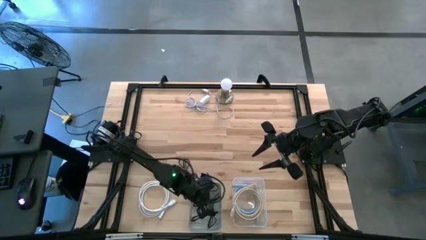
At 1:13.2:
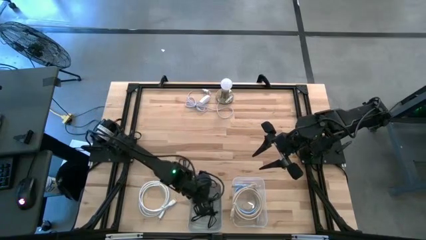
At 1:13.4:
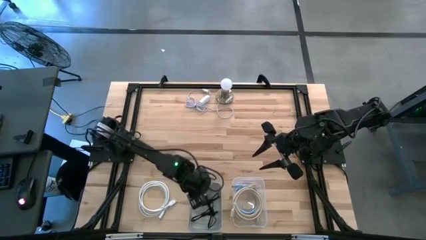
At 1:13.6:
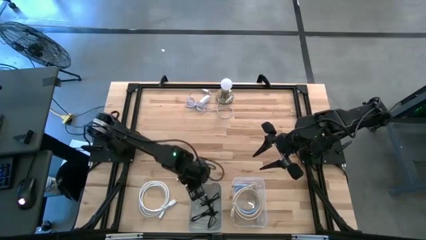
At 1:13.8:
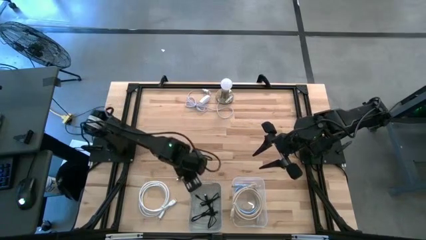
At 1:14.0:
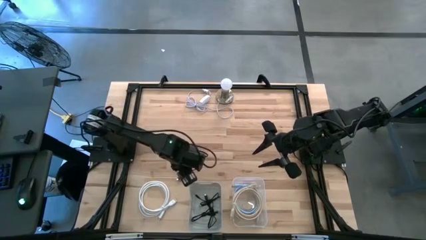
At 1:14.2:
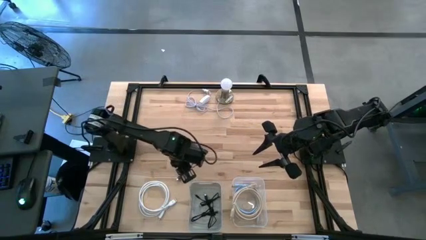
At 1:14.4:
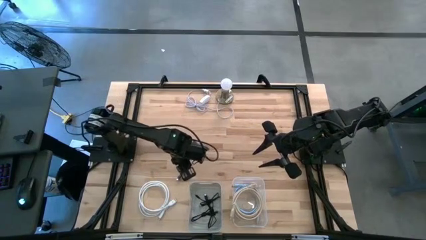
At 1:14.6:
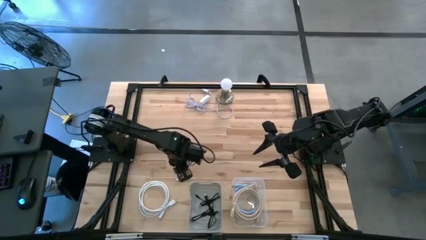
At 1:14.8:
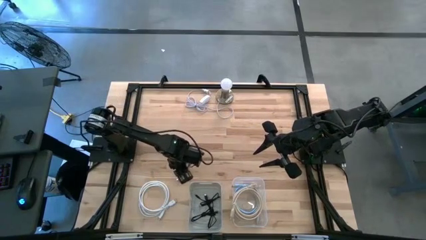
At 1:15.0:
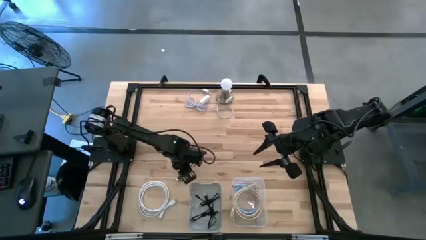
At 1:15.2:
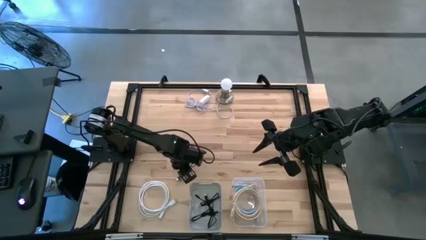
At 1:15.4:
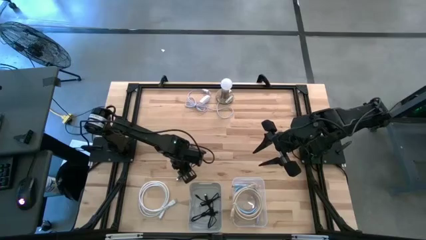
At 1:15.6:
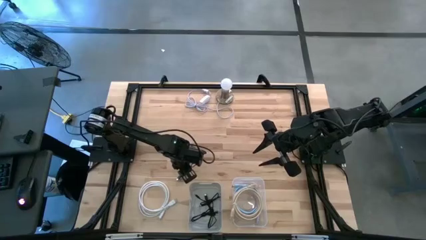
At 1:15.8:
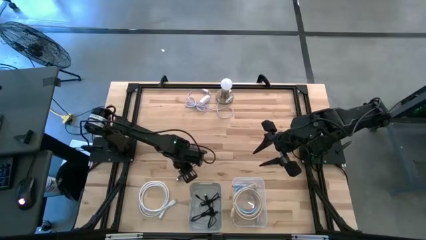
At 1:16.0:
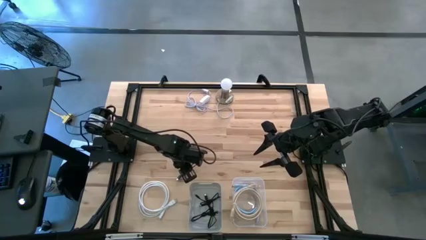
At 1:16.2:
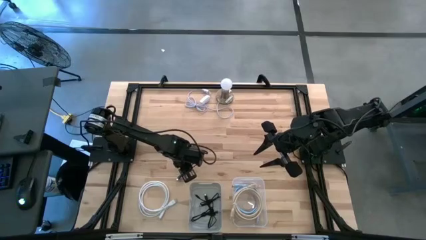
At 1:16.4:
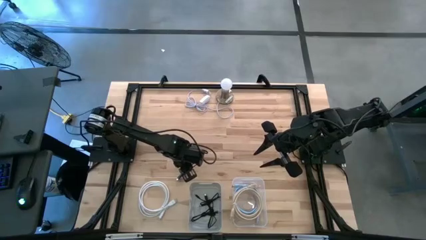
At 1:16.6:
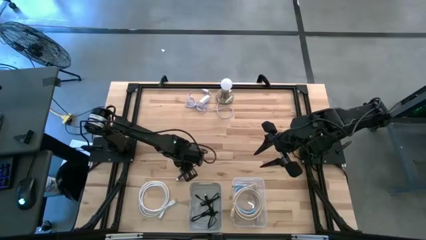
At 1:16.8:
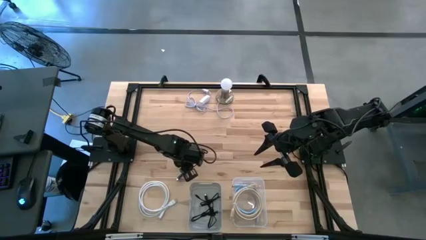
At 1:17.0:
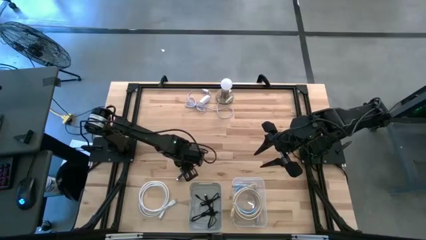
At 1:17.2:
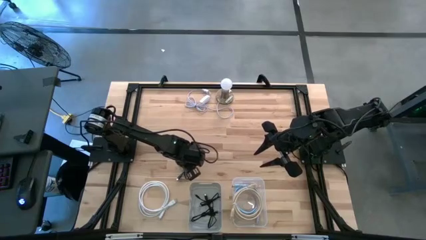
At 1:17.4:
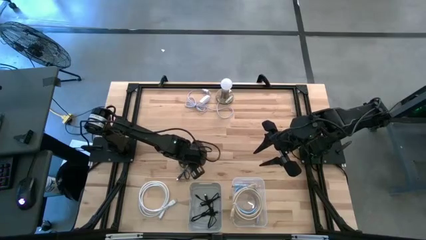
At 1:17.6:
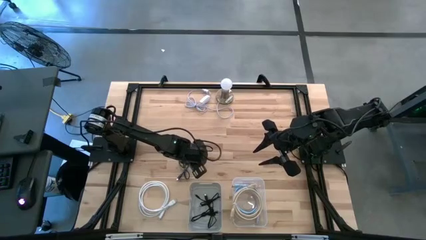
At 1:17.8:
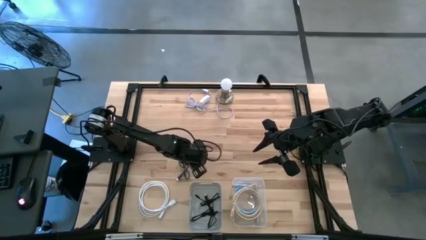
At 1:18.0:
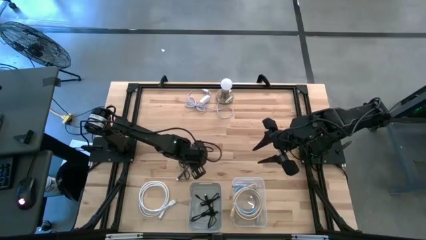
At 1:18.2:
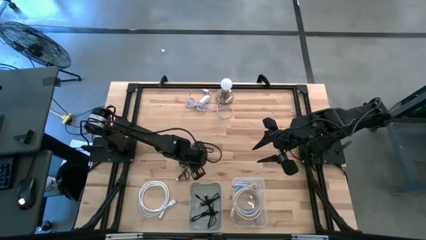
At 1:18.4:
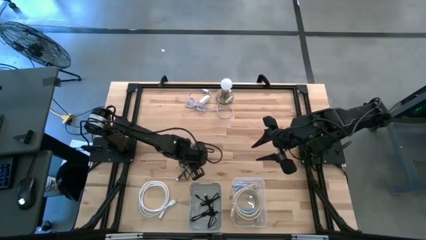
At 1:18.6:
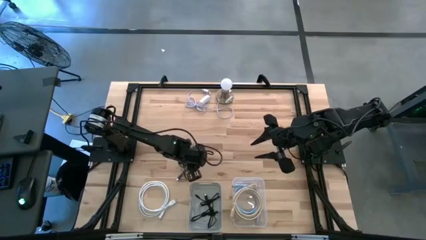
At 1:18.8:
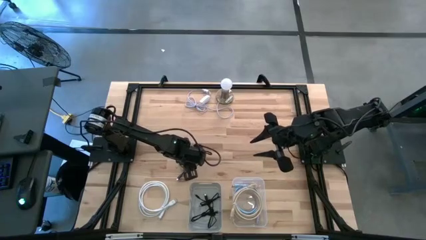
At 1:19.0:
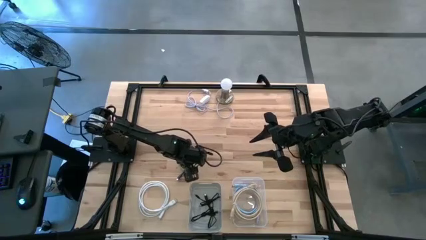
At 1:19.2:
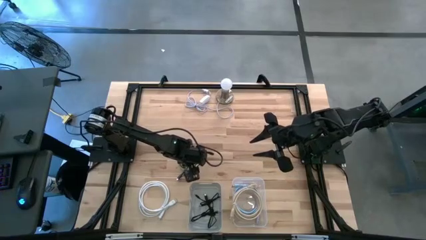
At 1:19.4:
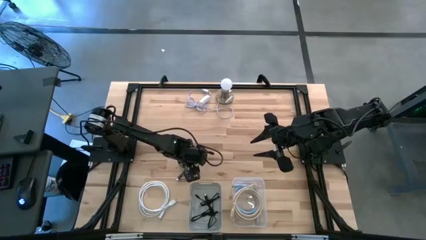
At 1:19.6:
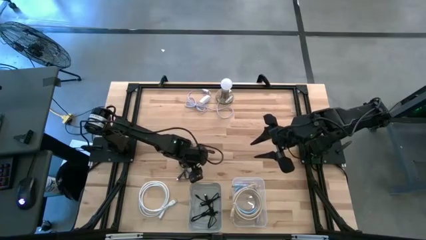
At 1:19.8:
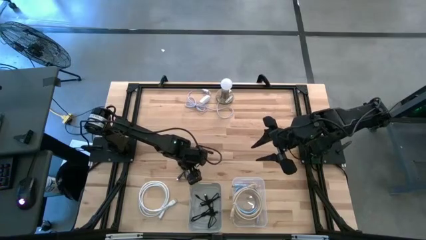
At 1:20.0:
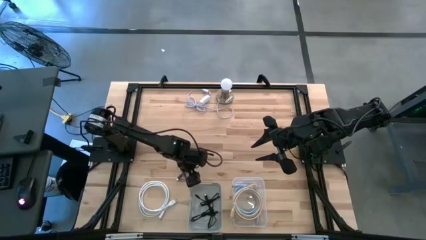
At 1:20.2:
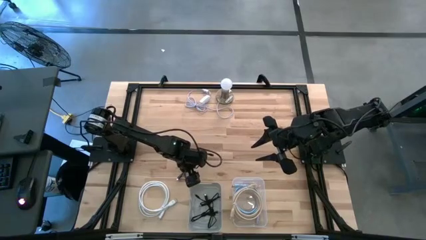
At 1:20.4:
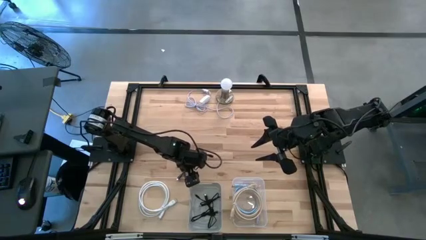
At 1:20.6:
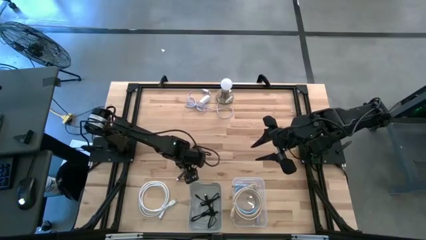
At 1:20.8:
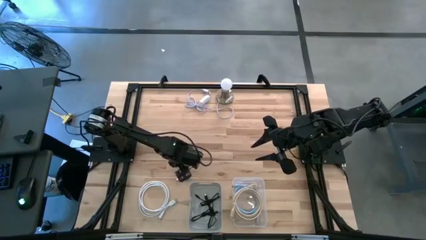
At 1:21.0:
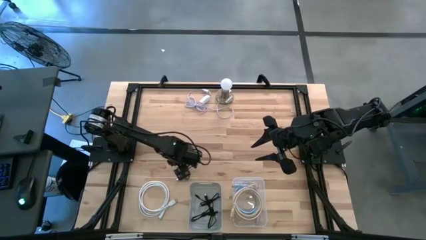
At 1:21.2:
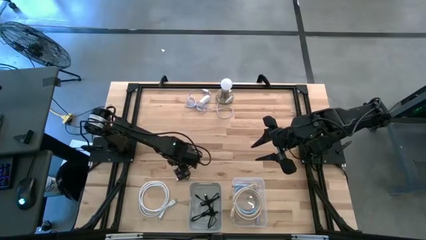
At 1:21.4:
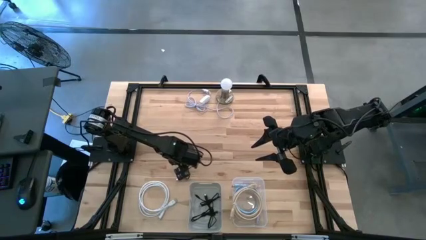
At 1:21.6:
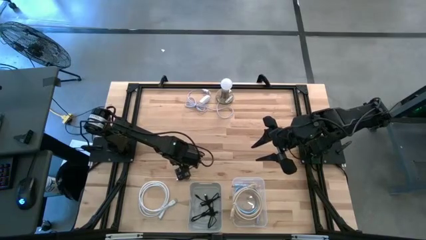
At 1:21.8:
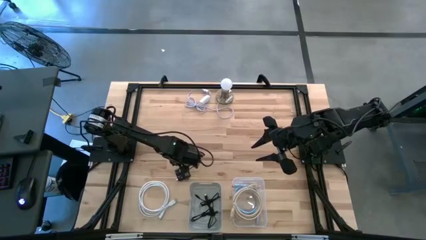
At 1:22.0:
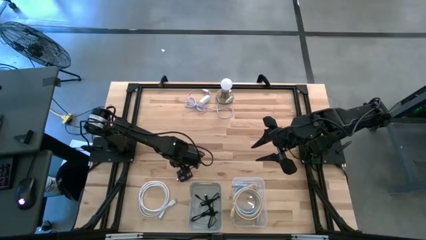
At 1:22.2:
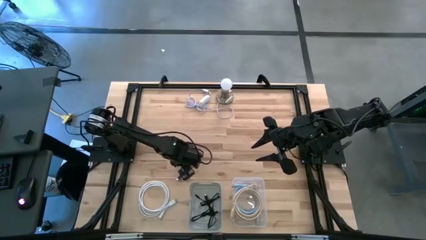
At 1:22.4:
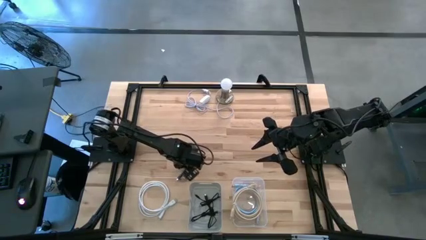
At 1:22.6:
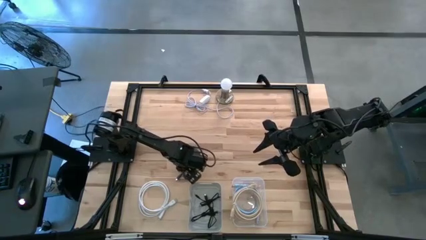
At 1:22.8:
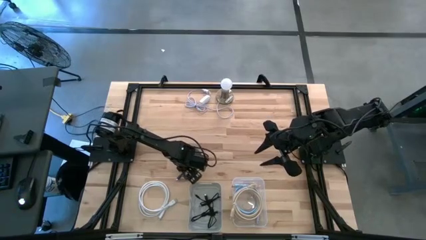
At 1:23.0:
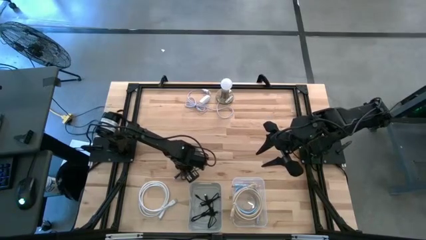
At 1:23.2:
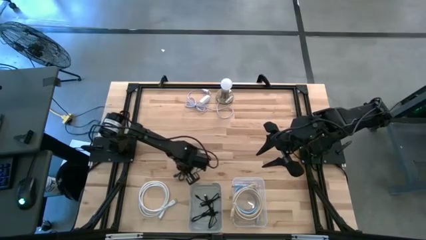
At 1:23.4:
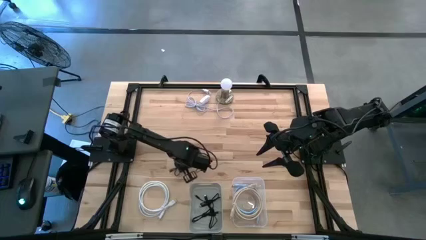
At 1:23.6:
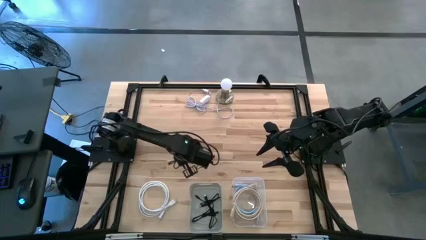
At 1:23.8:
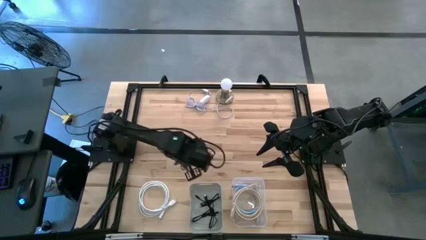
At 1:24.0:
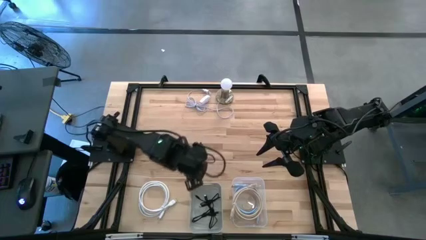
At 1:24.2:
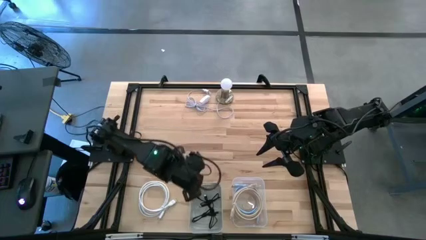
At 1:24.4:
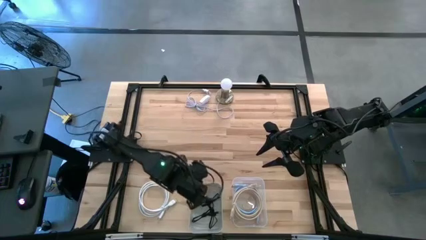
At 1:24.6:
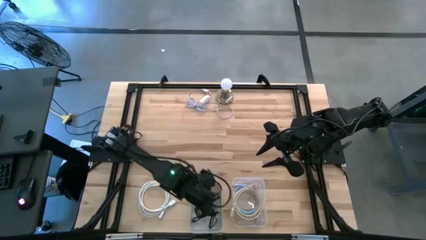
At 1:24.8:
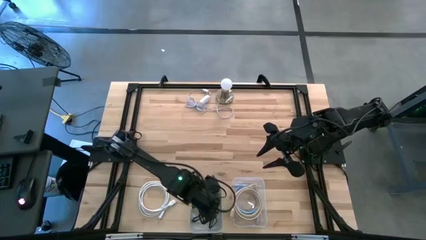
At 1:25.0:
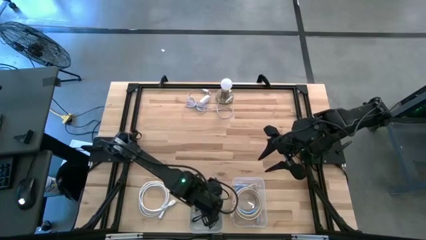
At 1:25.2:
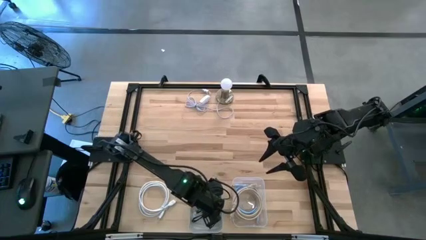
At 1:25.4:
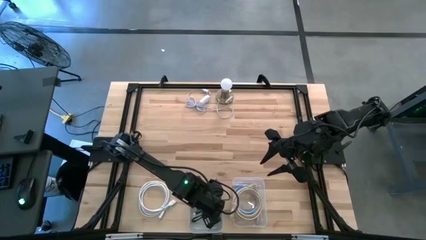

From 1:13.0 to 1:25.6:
Task: Pick & Place USB Port
Put the black USB cable into the gray bin

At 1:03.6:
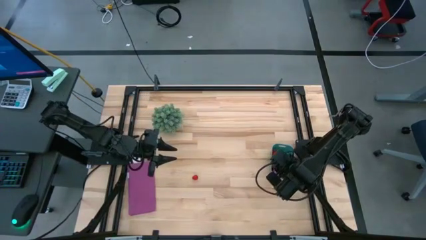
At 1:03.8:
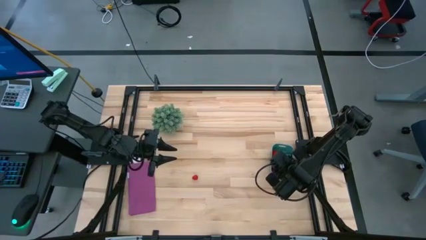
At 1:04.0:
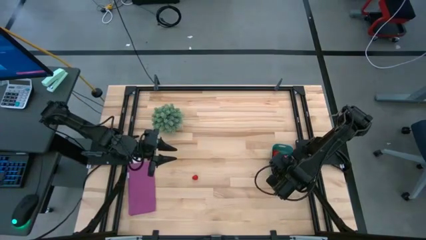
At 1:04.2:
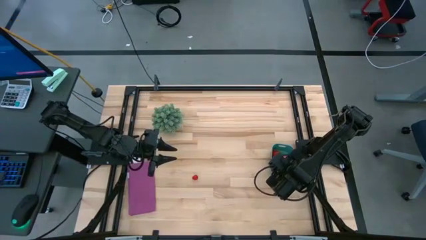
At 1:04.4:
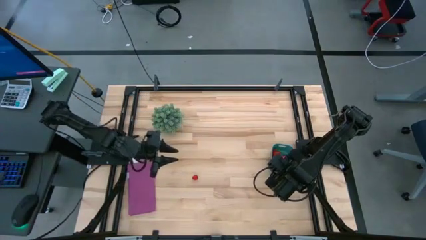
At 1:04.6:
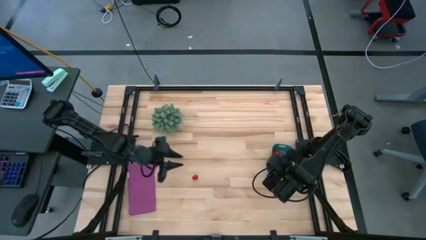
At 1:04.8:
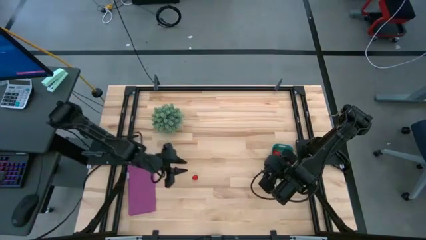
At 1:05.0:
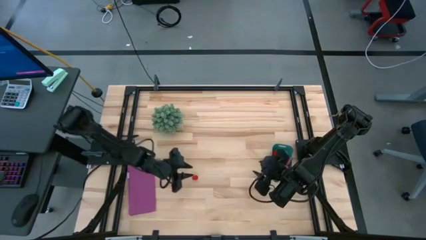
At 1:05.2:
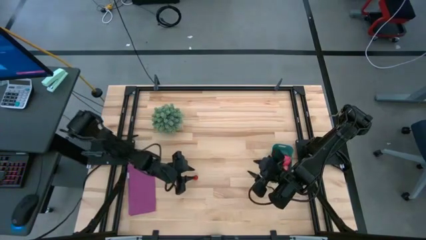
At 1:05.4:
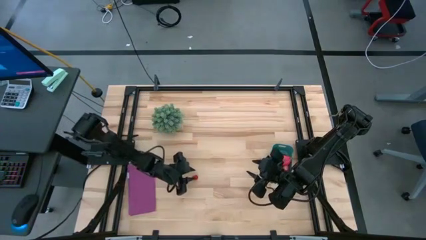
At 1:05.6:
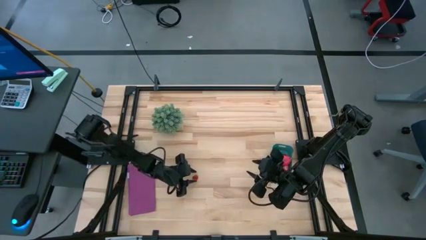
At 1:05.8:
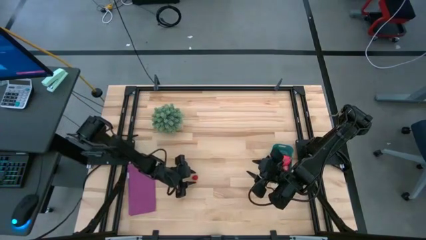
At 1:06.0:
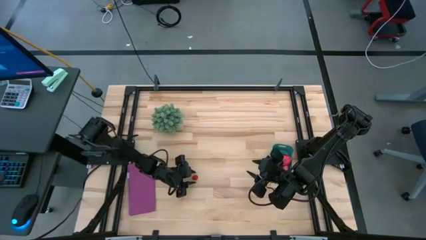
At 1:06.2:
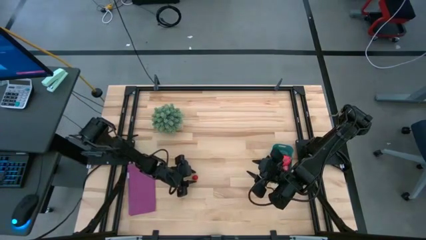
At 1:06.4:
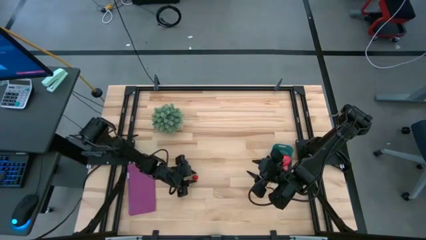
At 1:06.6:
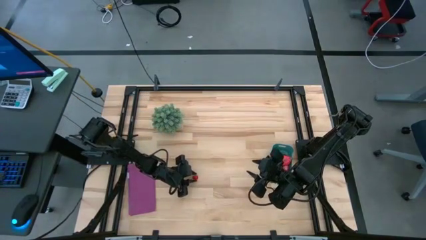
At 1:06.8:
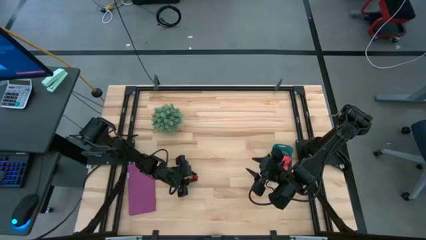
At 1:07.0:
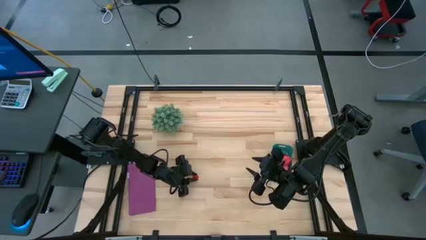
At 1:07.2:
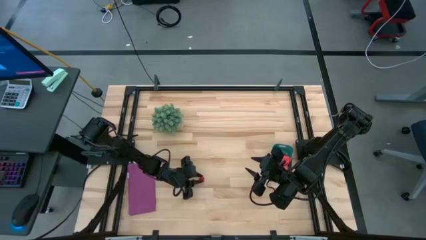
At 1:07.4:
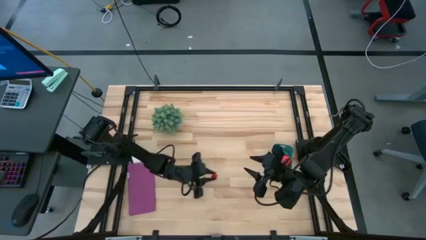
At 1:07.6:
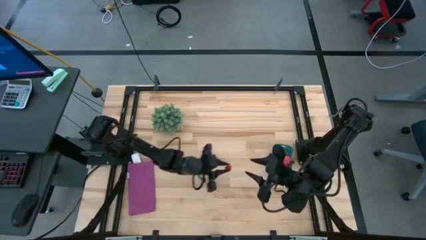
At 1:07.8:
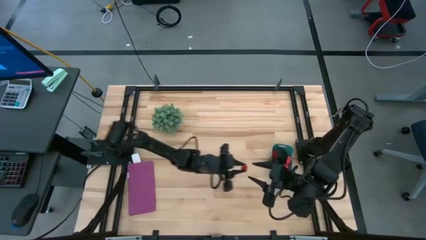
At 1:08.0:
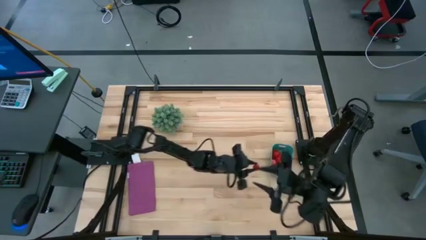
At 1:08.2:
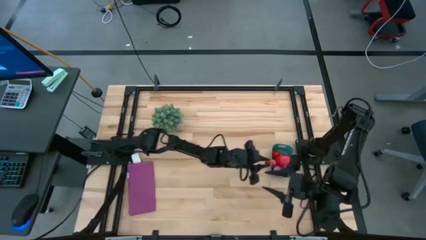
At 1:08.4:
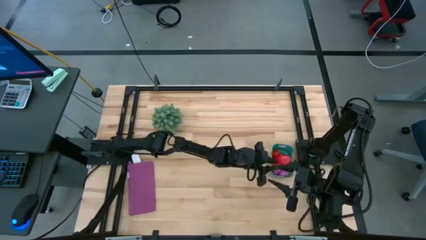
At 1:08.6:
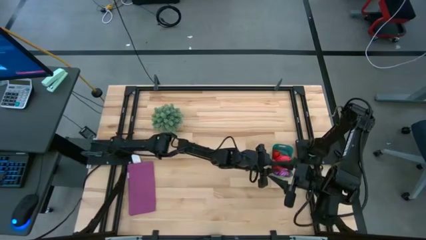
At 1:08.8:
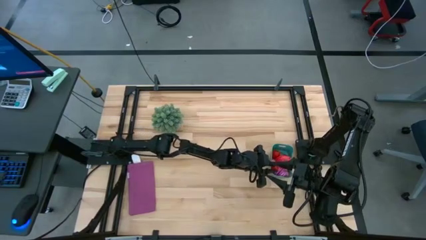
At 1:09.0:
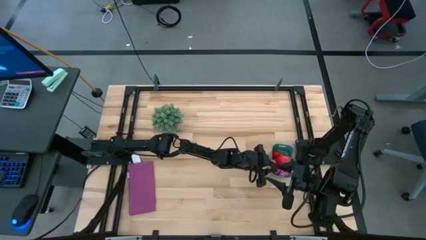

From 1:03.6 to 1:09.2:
Task: Pick and placing Produce into tupperware
Put the red strawberry into the green bin
